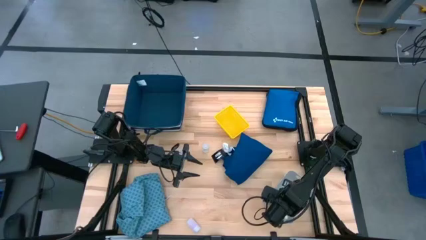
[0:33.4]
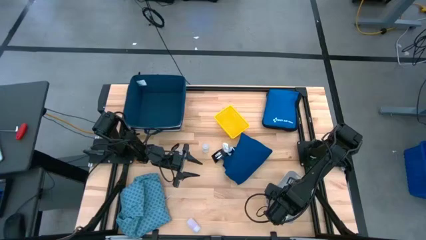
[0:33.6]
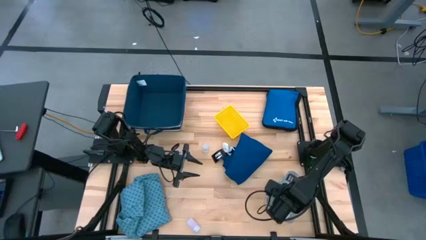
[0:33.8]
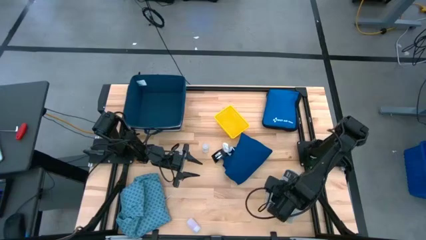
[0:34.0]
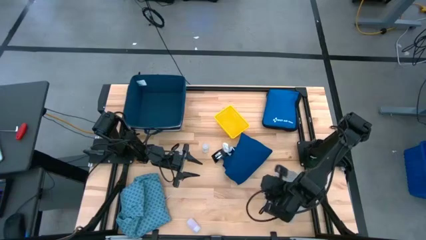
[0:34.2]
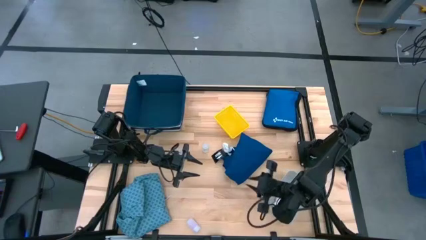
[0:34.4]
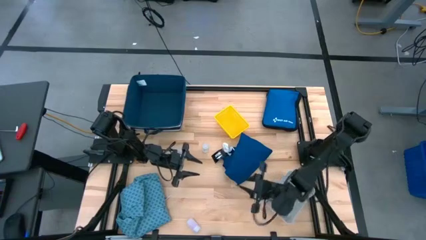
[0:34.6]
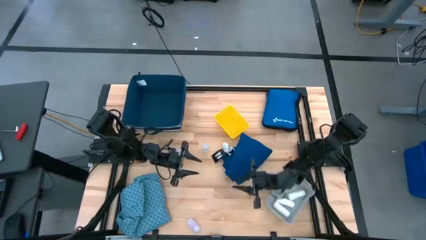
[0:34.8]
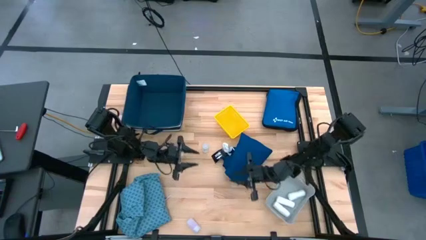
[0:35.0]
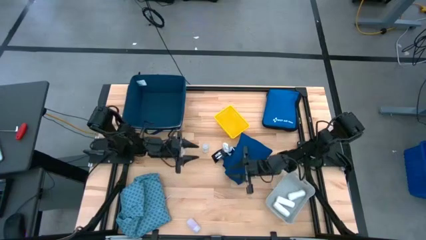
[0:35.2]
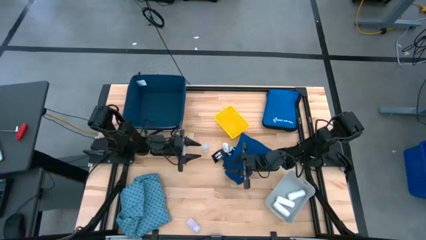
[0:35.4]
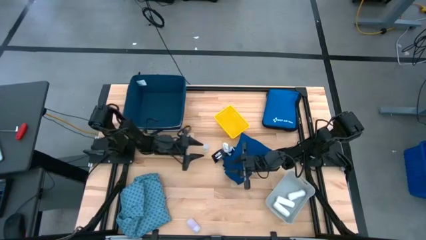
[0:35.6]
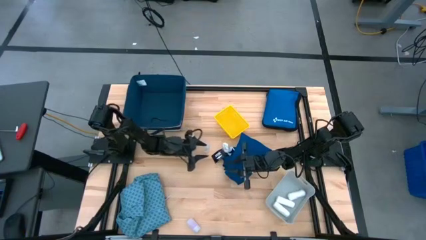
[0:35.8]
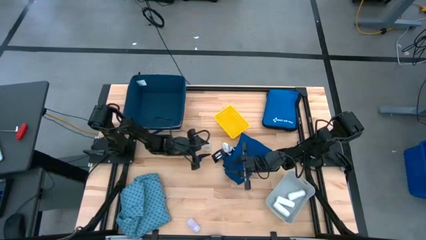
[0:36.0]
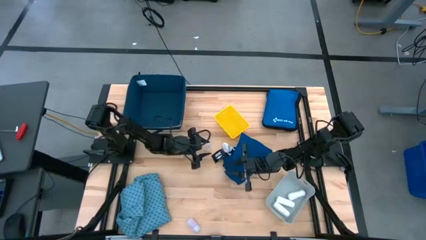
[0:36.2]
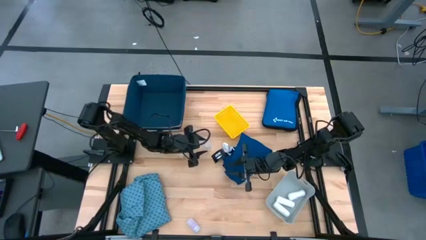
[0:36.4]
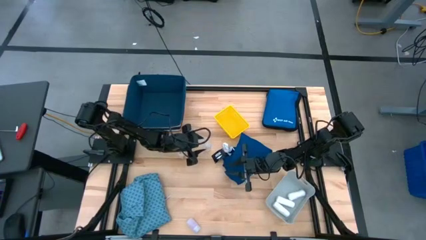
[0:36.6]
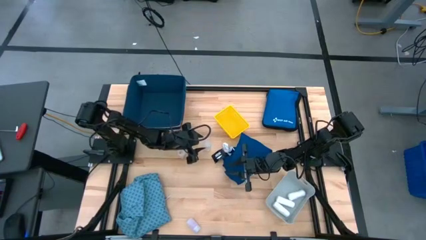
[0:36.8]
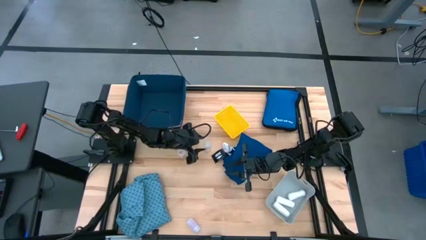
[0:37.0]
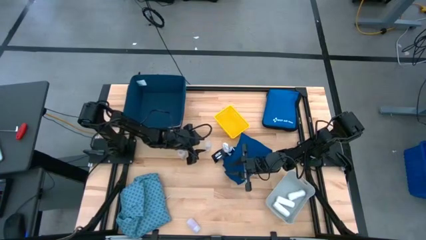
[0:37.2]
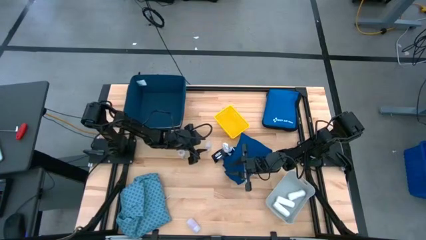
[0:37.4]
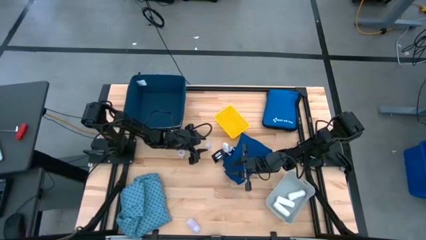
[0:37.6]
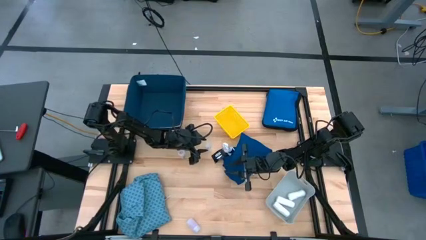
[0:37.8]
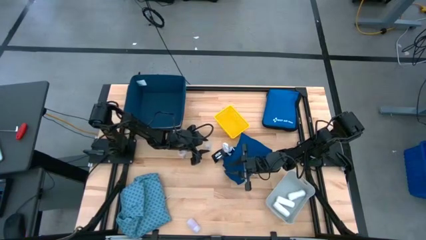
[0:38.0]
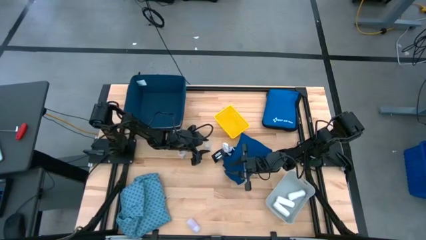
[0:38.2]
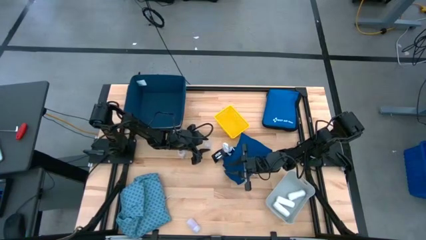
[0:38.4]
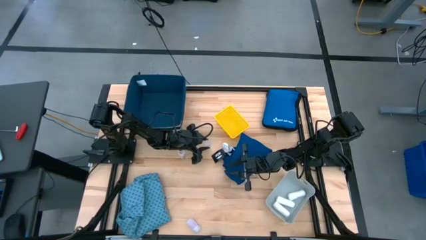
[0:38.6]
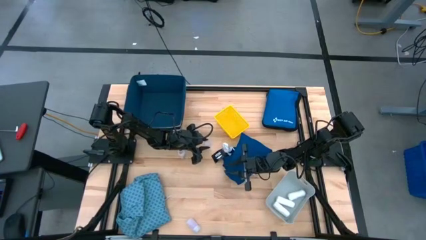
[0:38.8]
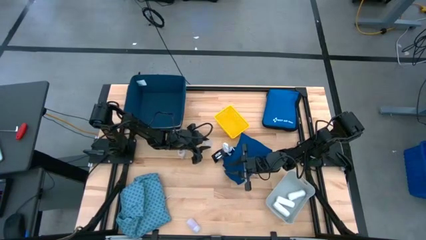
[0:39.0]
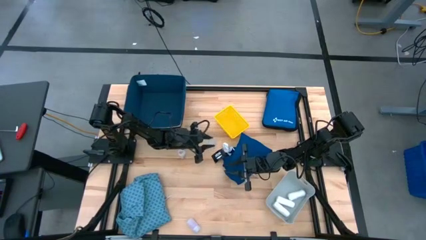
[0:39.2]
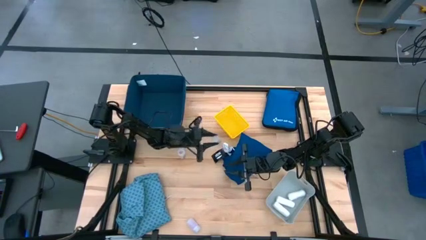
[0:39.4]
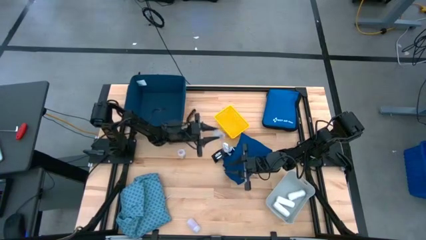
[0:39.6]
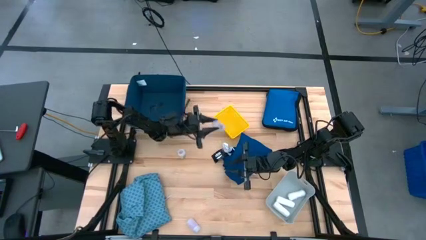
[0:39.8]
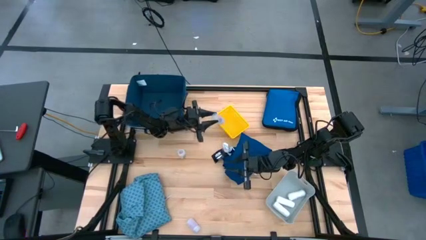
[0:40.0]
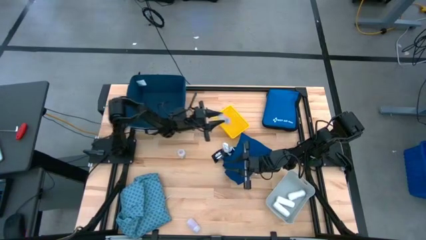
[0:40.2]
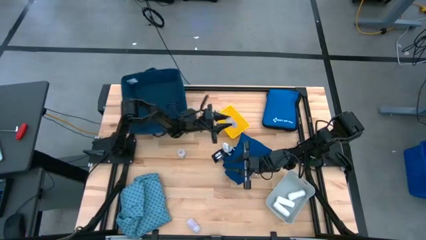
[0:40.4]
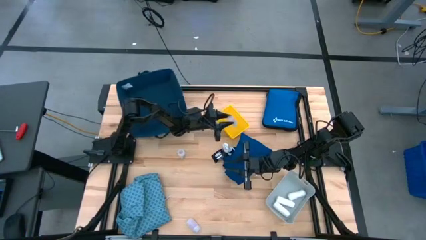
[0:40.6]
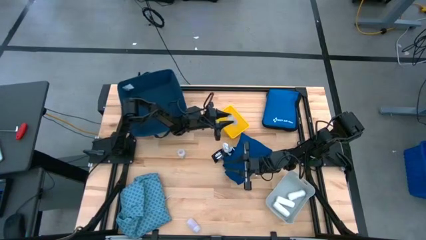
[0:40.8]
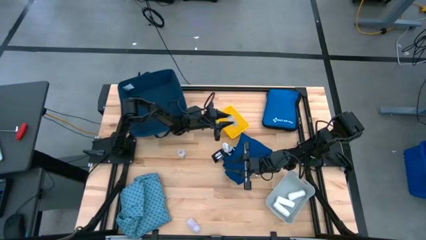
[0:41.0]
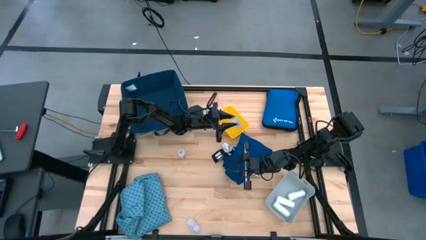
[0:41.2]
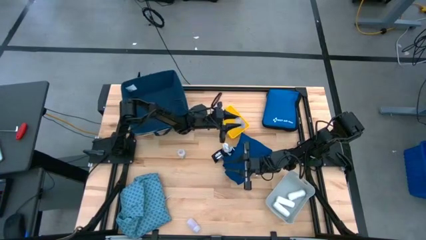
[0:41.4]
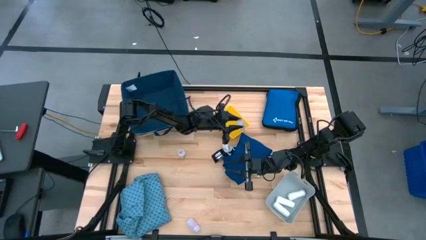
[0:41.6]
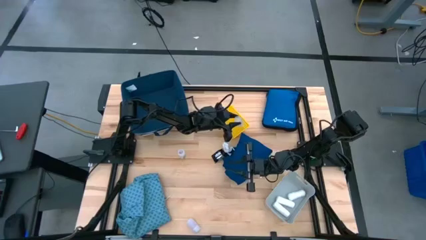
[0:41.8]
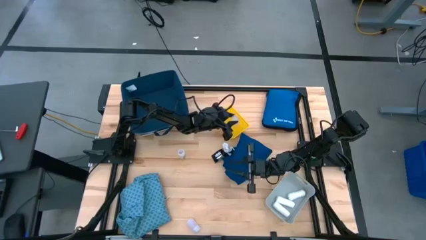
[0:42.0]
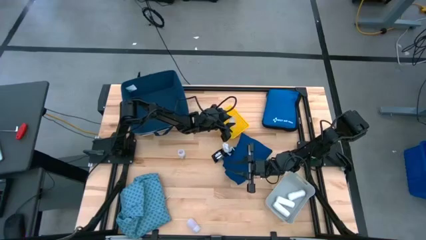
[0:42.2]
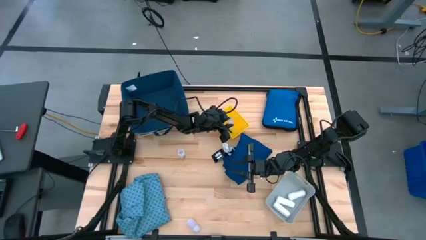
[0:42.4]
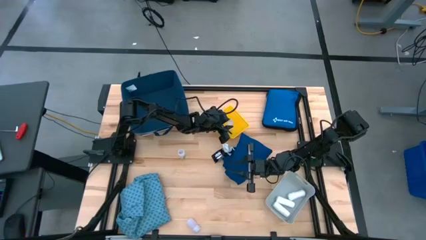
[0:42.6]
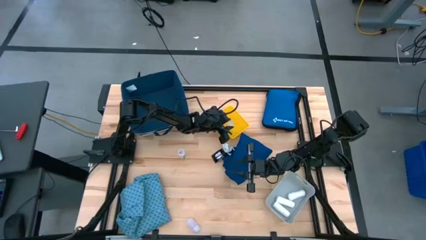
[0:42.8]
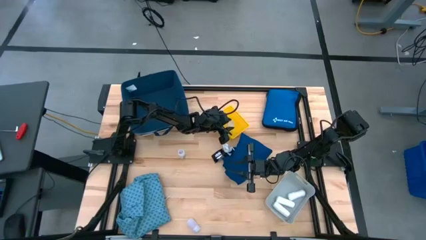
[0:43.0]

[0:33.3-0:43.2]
Task: Pick & place medical supplies in basket/bin
Put the top right transparent pill bottle into the yellow bin

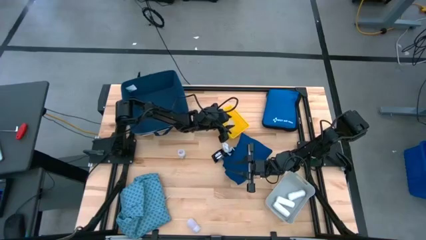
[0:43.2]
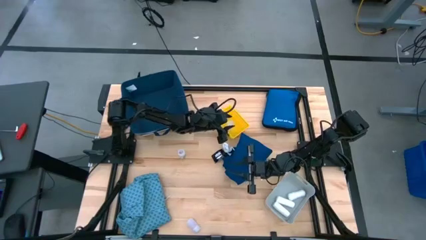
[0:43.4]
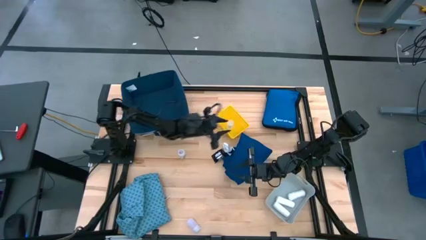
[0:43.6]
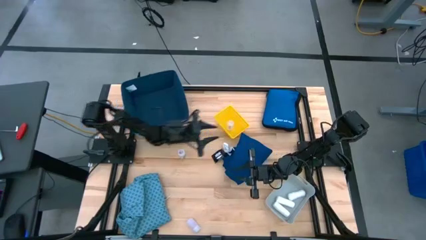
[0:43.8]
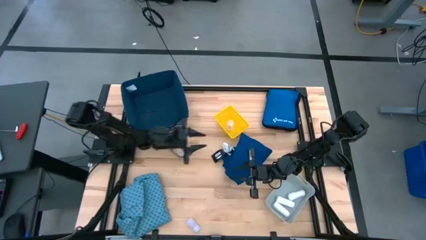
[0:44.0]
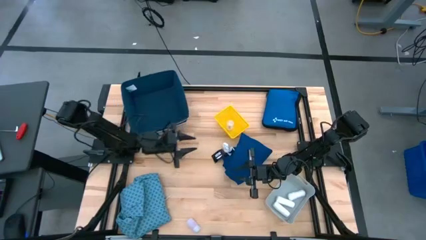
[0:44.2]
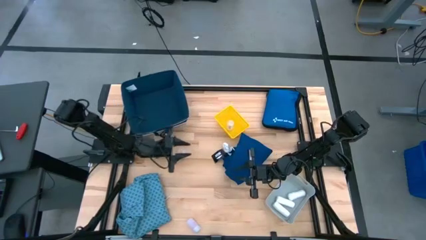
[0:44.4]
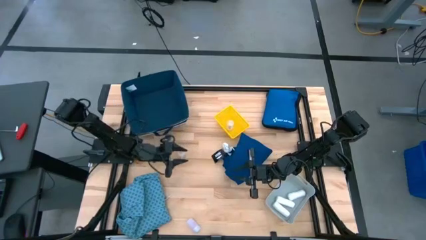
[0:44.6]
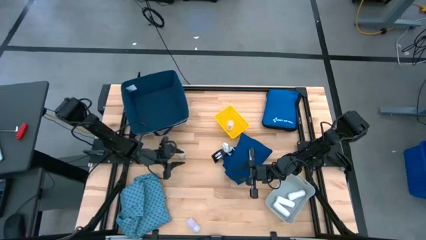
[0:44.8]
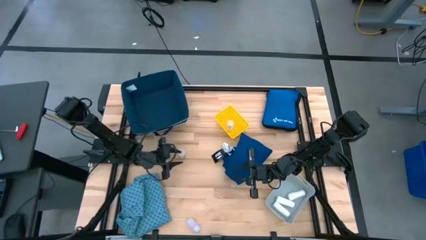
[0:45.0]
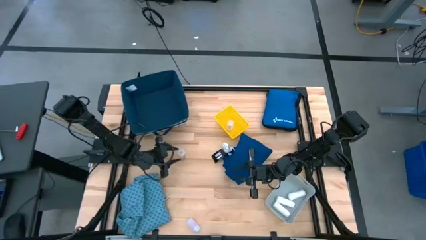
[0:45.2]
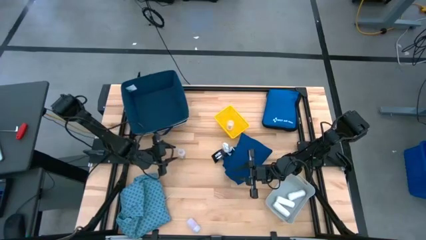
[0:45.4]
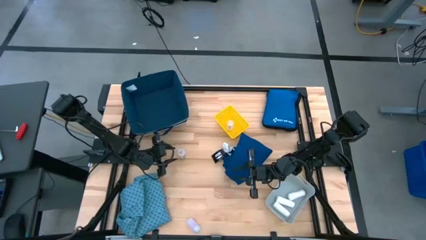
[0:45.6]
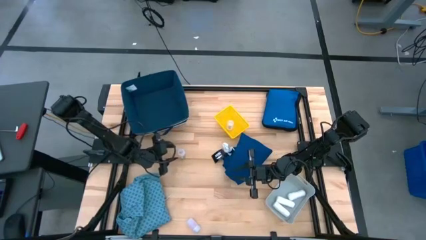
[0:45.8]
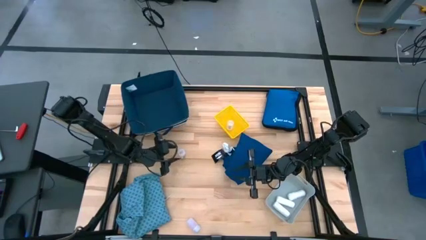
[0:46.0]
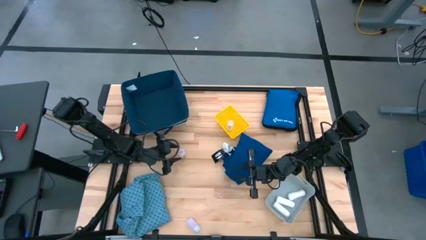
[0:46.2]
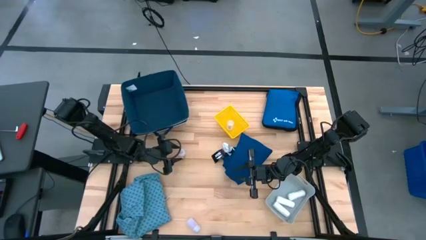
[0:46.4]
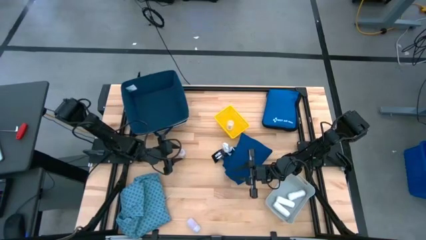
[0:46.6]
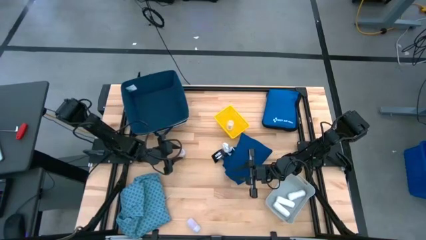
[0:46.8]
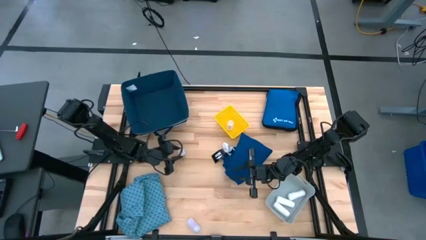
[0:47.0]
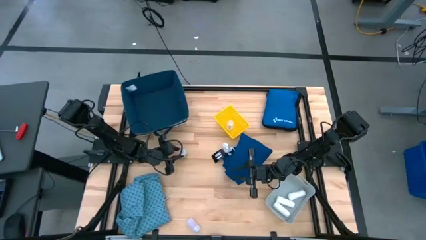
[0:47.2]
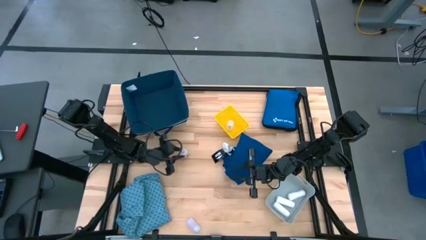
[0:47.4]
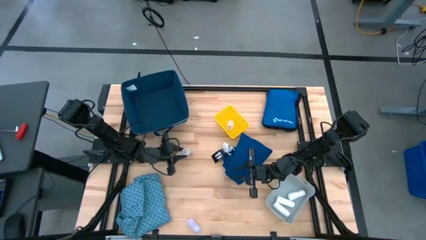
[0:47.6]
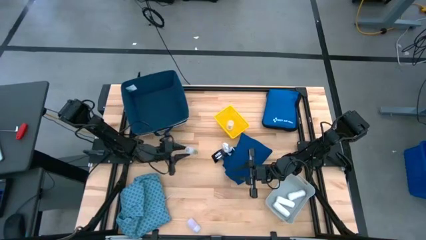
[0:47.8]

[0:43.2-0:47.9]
Put the top transparent pill bottle into the yellow bin
